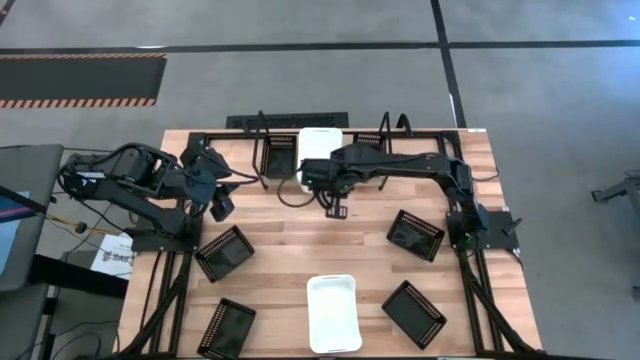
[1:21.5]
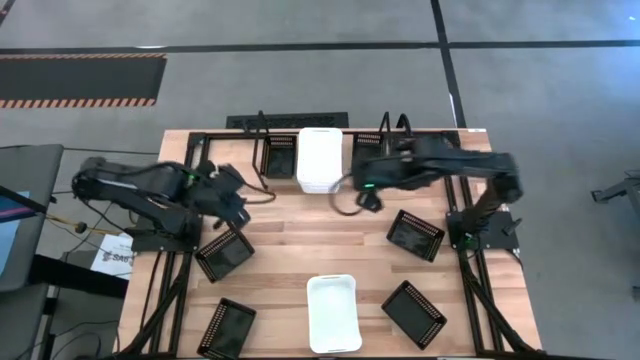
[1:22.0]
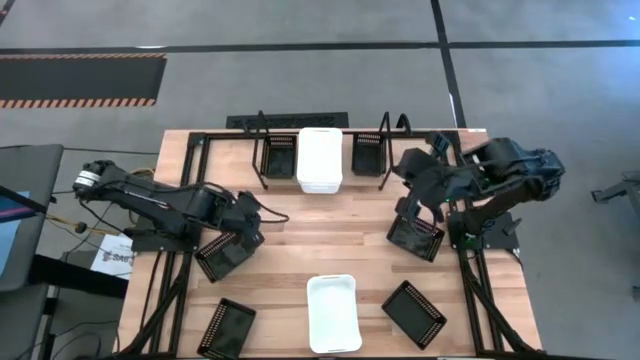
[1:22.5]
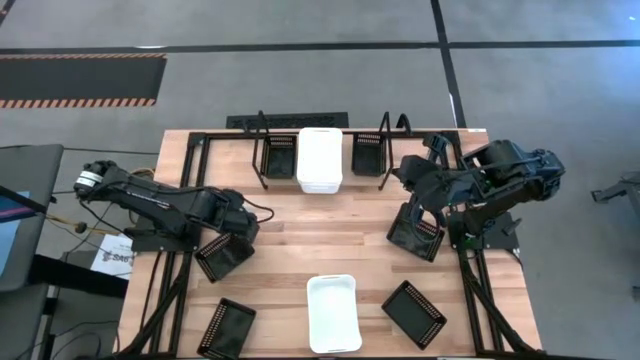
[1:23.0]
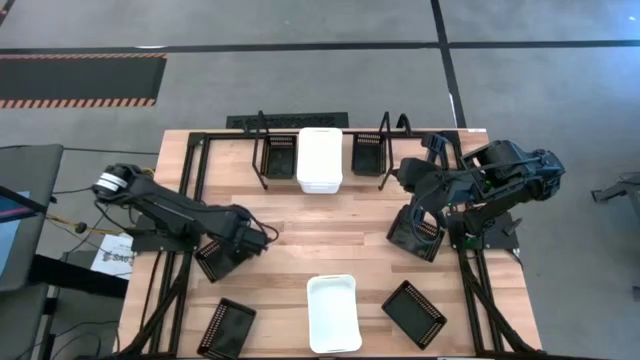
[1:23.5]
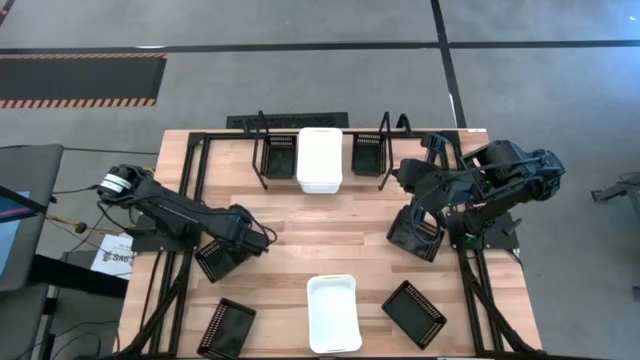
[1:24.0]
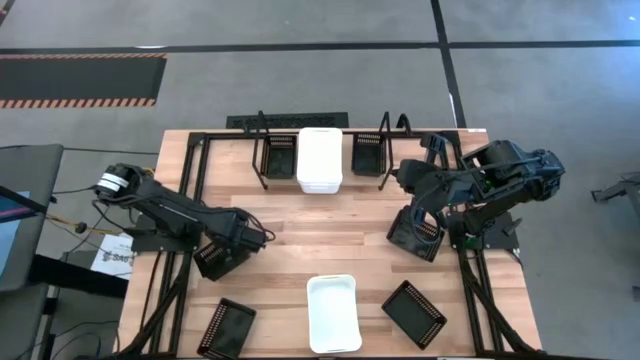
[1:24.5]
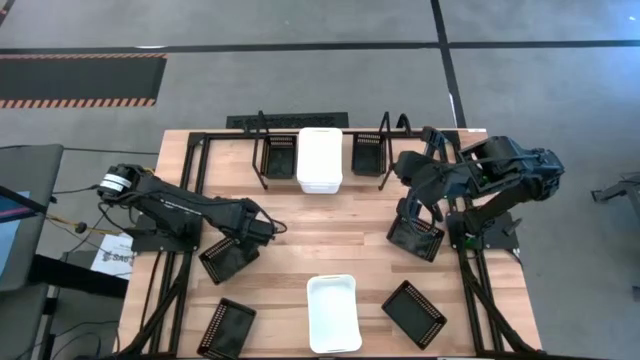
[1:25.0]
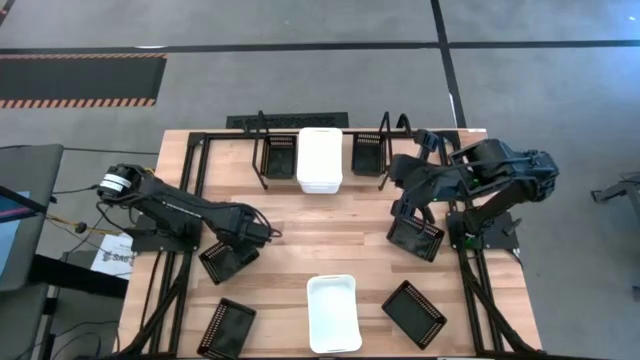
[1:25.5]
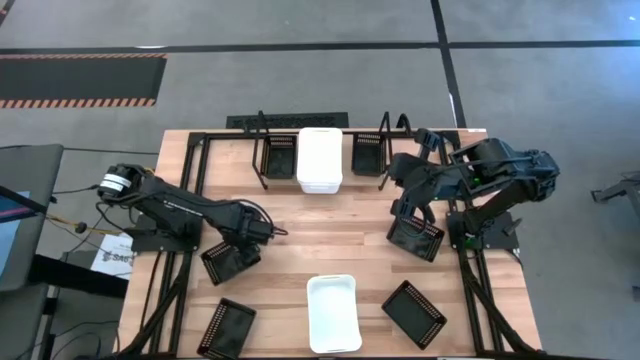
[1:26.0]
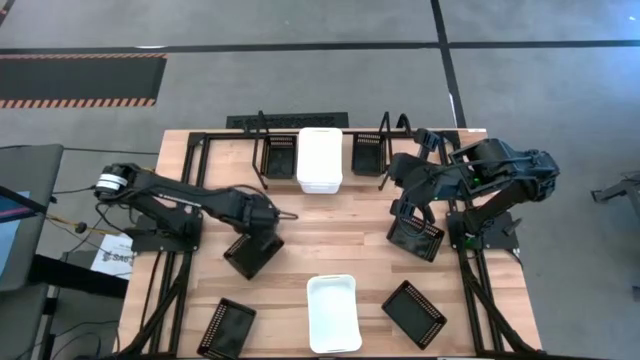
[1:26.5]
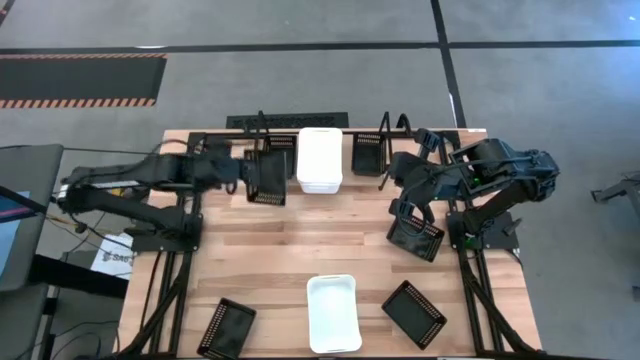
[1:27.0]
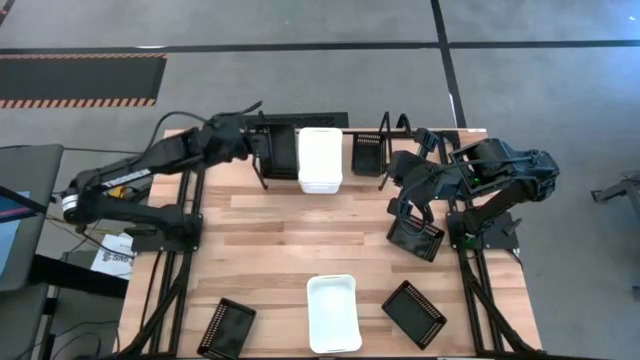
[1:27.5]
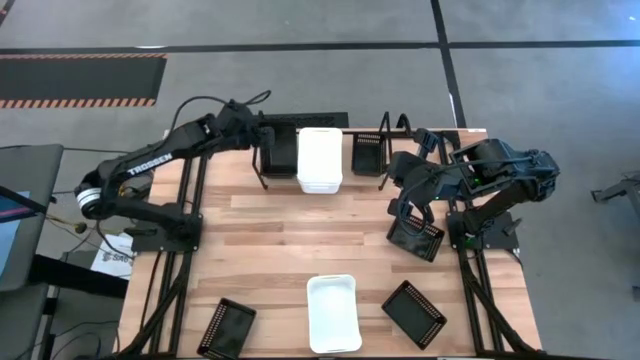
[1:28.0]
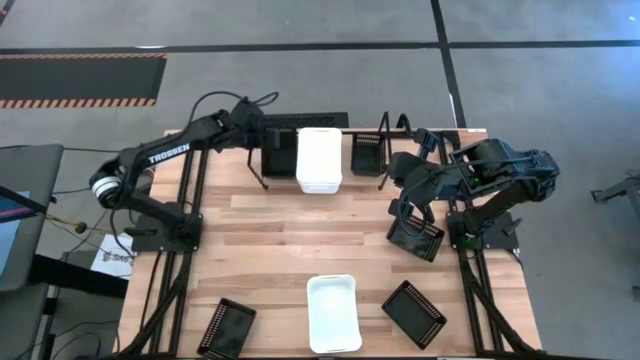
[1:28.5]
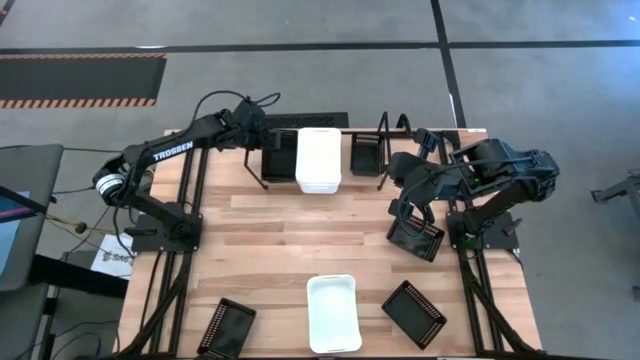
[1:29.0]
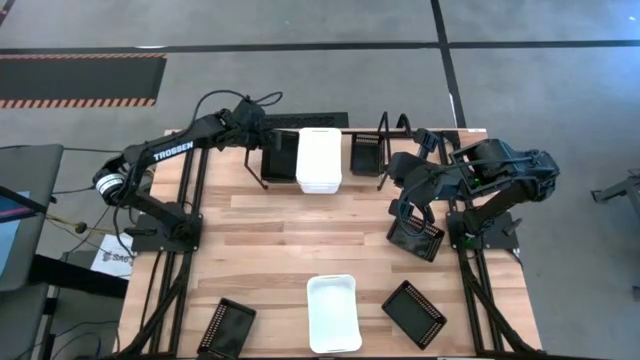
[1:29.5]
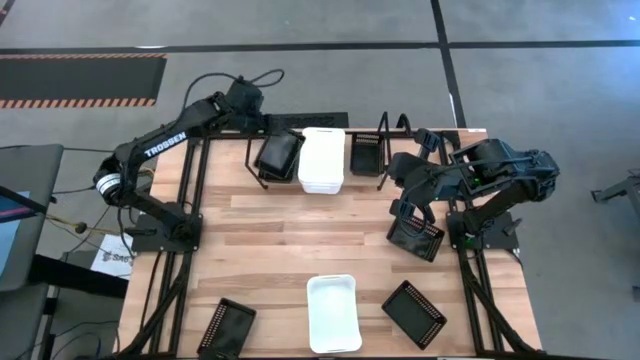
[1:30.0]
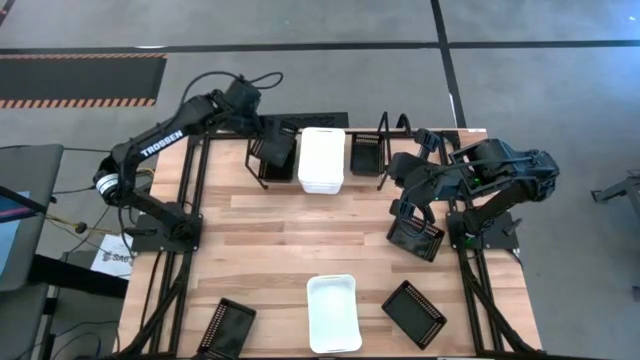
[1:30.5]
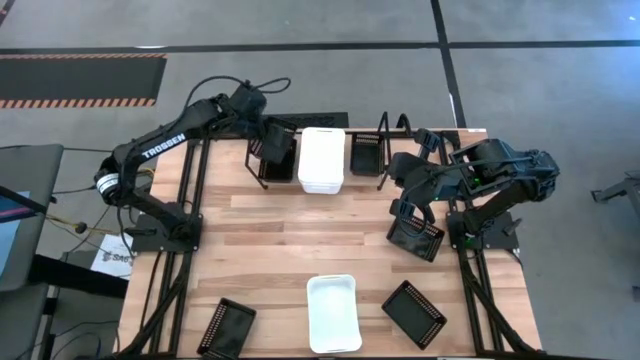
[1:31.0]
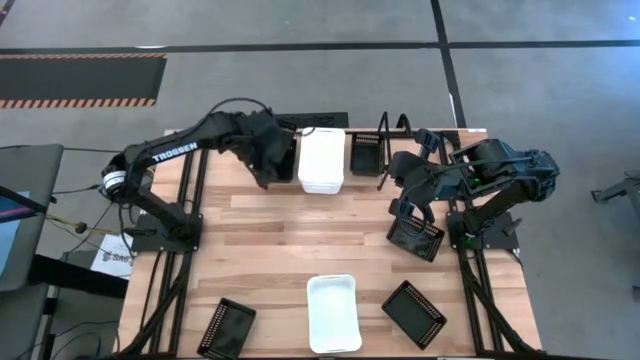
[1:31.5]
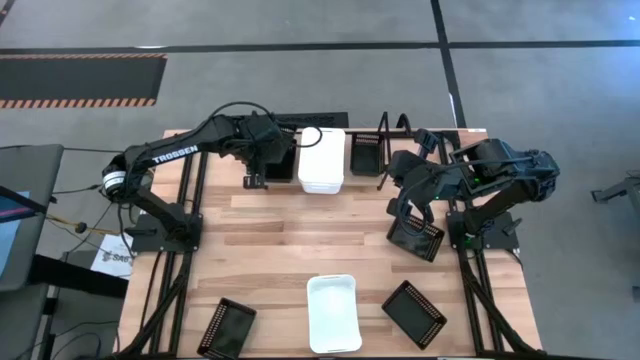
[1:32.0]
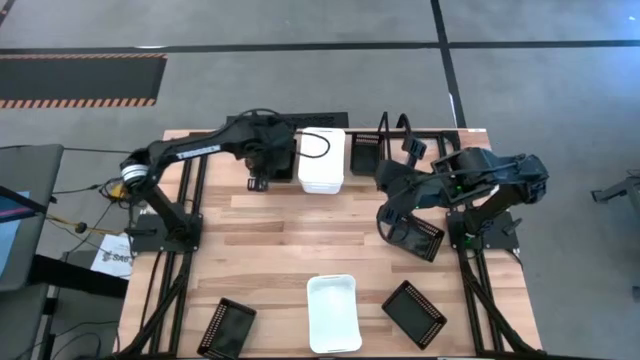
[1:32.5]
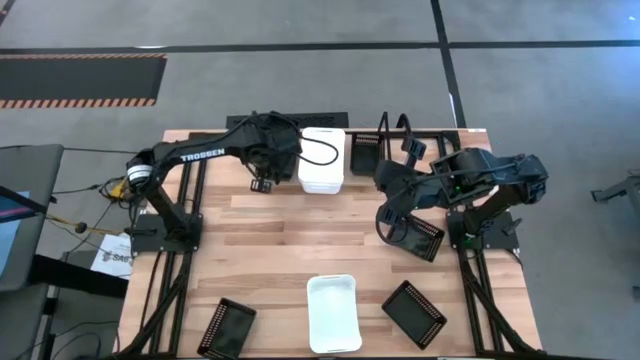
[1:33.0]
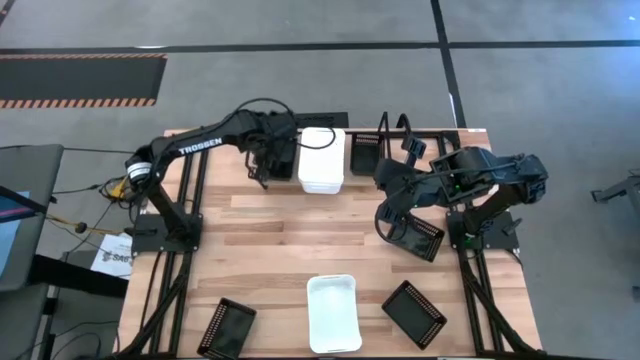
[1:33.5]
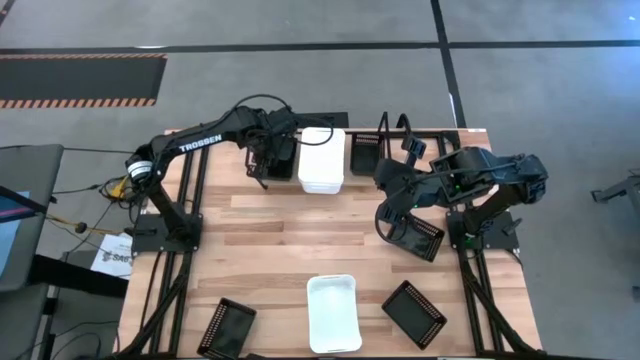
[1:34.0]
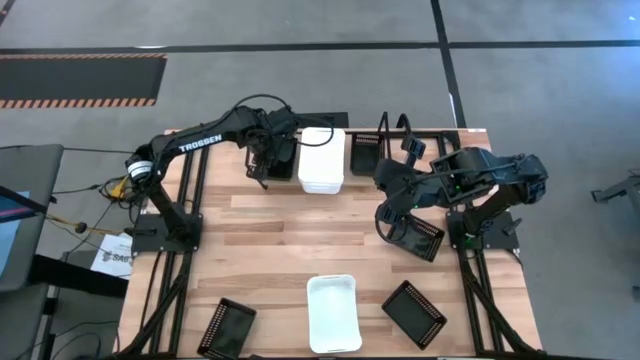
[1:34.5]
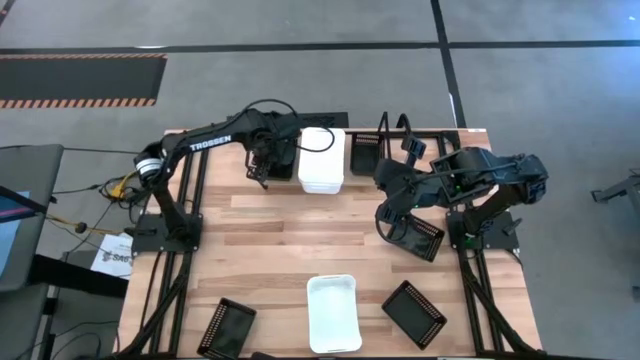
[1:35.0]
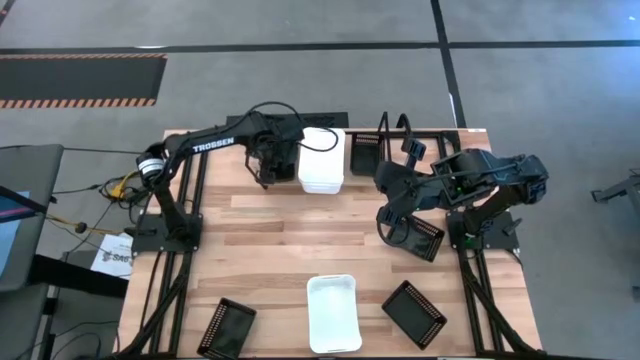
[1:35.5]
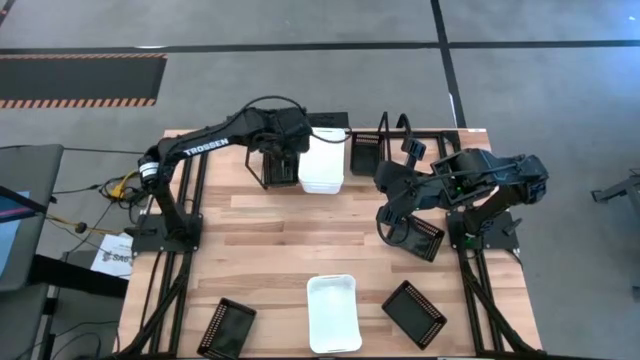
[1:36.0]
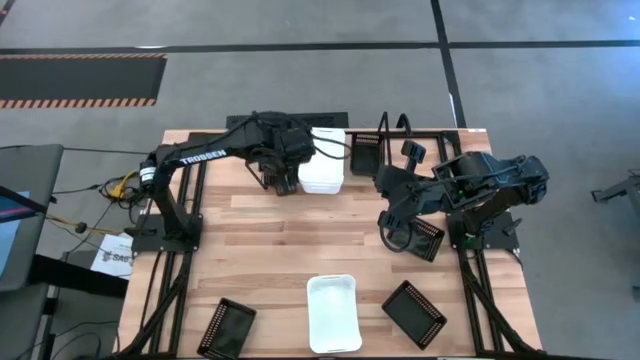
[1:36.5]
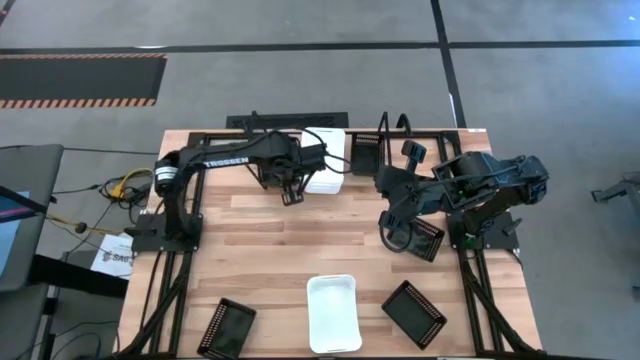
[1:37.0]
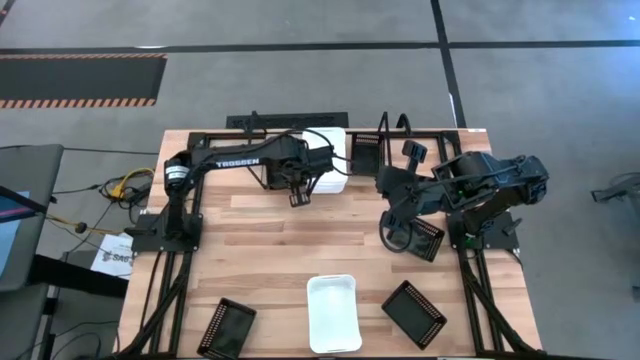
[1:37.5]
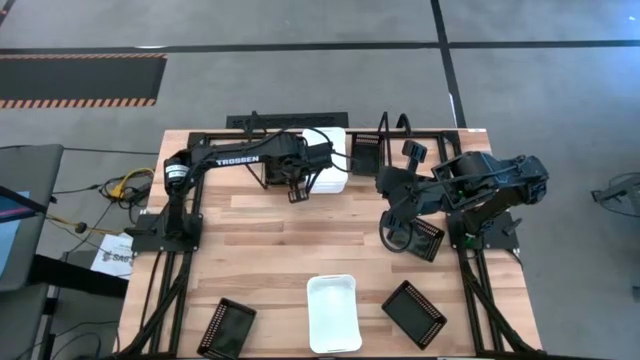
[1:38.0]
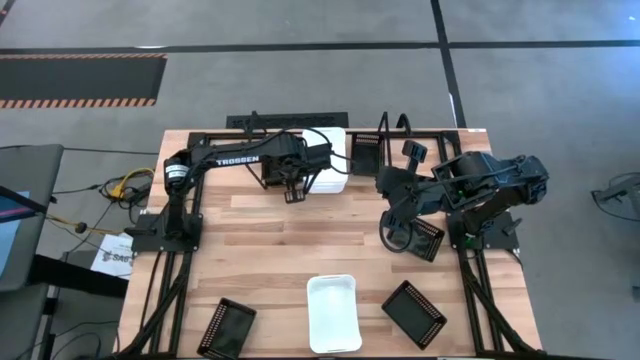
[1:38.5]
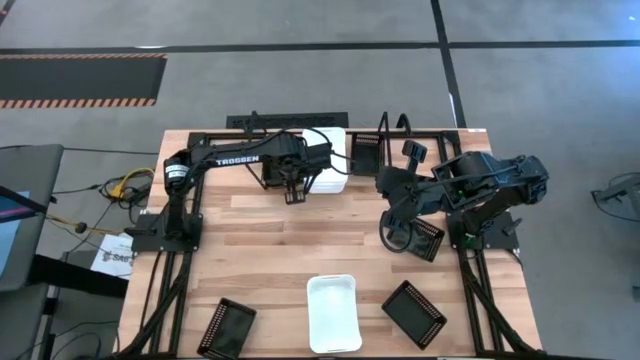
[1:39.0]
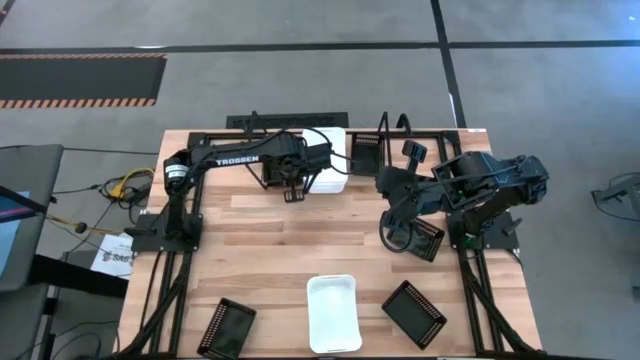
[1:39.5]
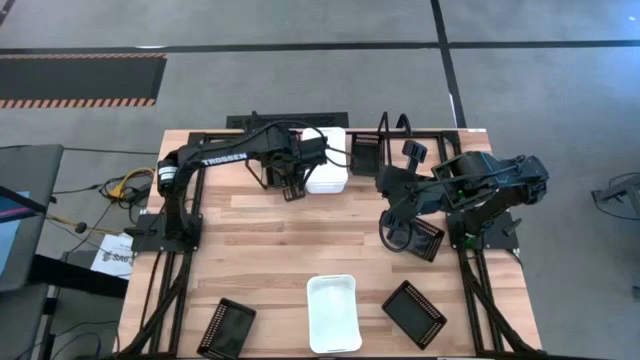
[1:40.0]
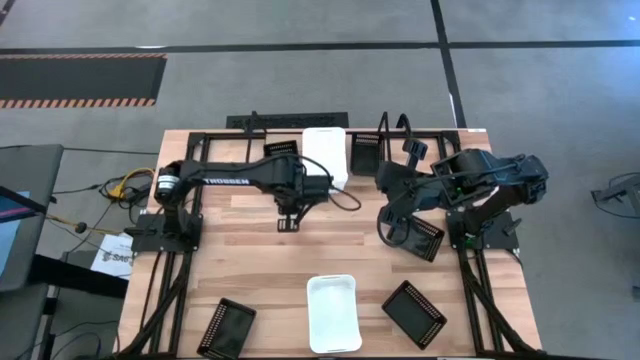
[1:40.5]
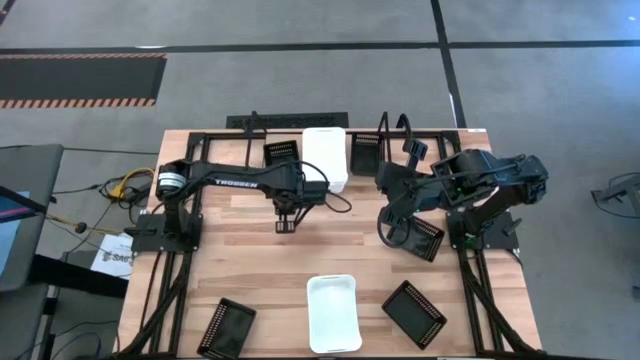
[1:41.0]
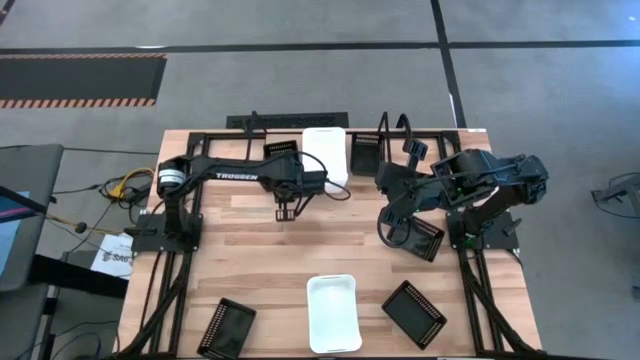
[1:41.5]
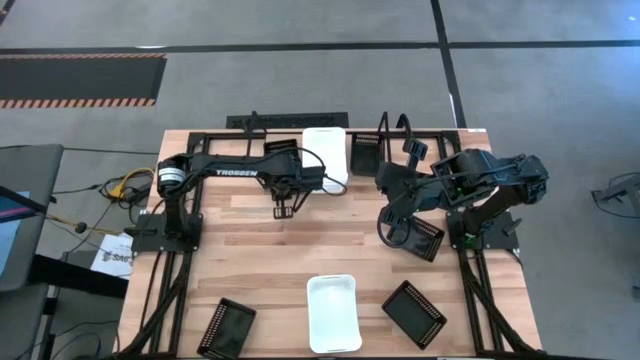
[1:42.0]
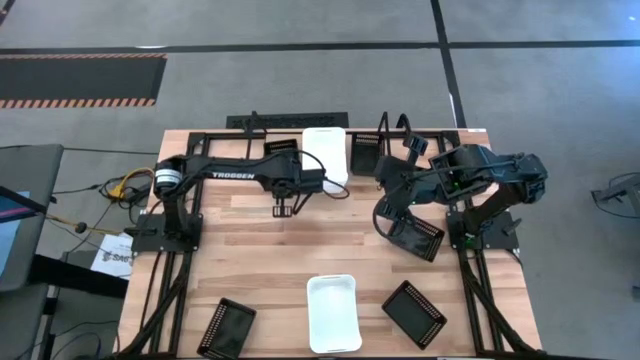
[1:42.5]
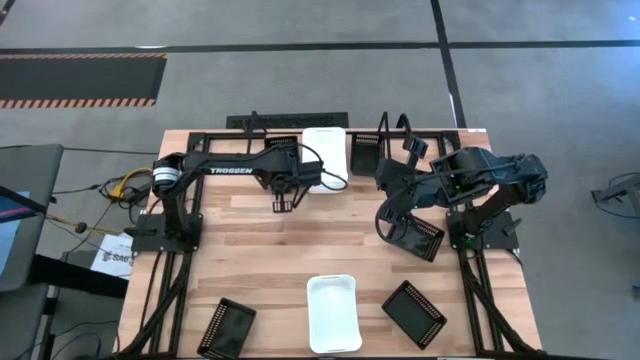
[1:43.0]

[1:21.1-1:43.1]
Task: Stack baskets on shelf by color
Stack the black bin on top of the left black bin on the shelf
